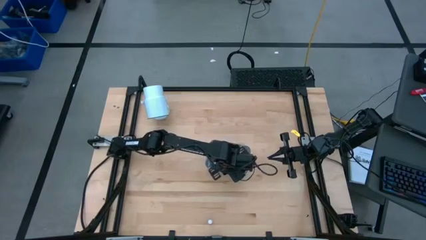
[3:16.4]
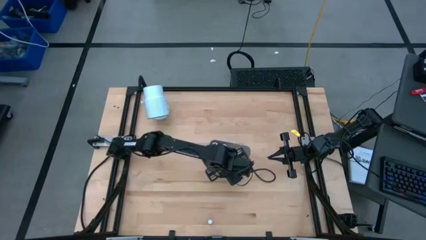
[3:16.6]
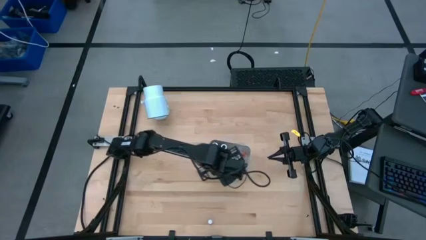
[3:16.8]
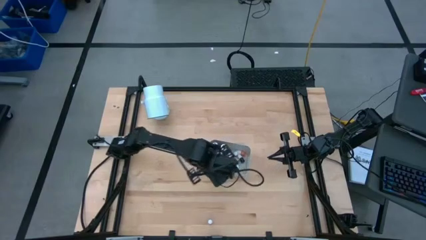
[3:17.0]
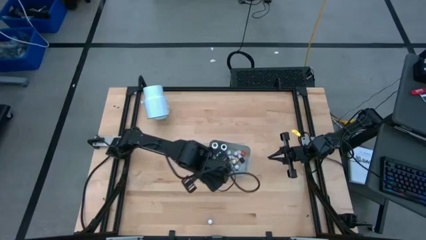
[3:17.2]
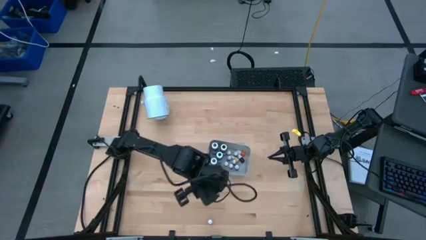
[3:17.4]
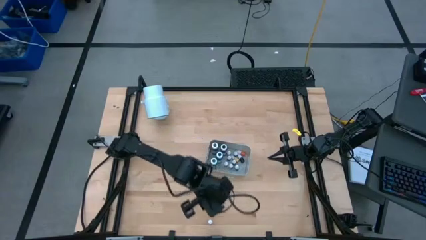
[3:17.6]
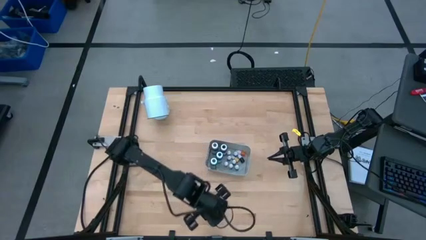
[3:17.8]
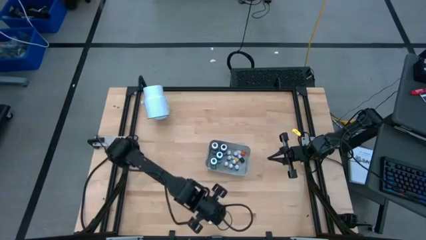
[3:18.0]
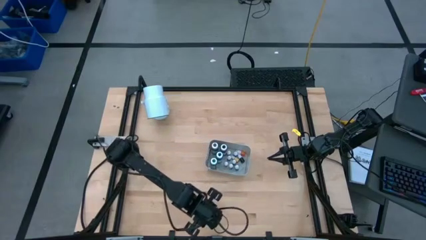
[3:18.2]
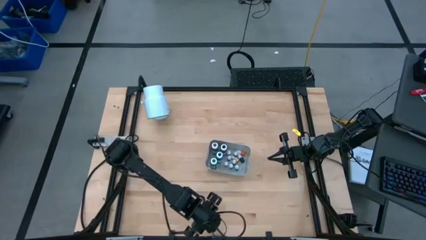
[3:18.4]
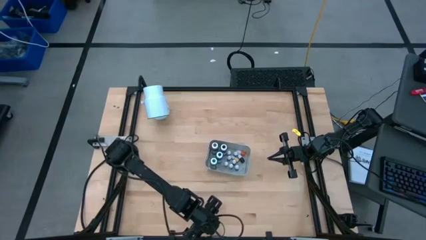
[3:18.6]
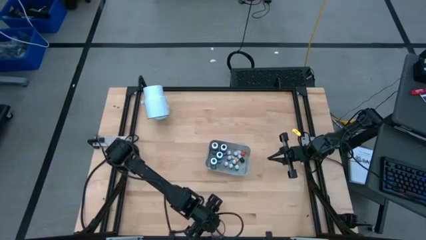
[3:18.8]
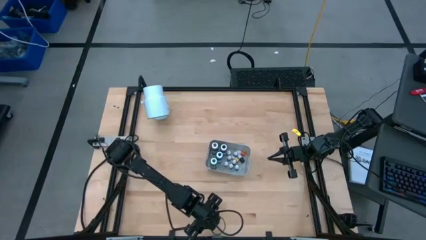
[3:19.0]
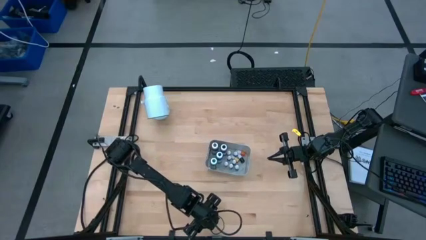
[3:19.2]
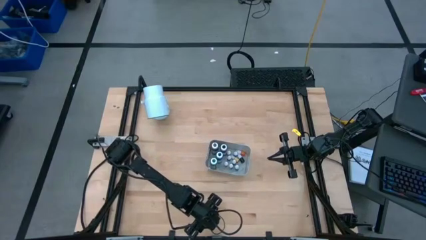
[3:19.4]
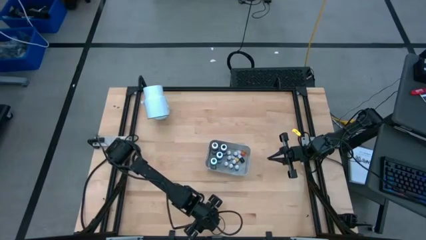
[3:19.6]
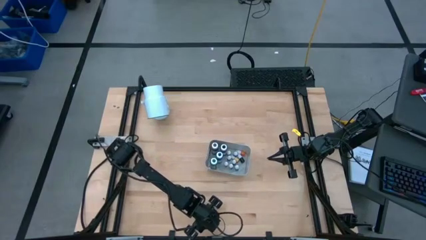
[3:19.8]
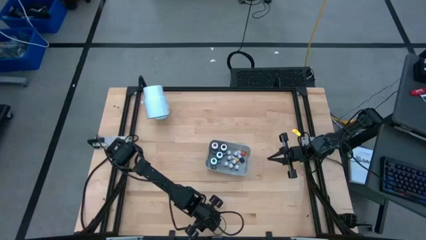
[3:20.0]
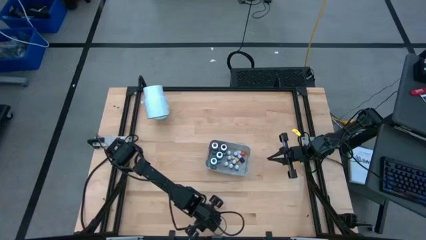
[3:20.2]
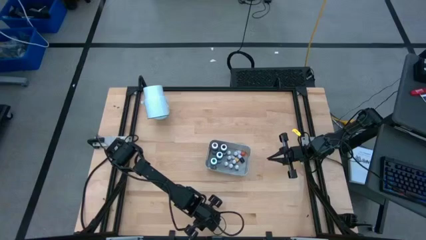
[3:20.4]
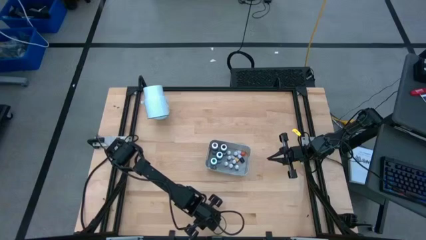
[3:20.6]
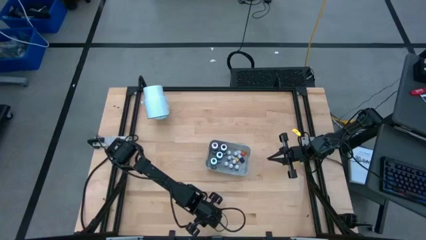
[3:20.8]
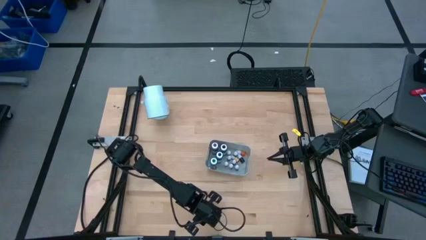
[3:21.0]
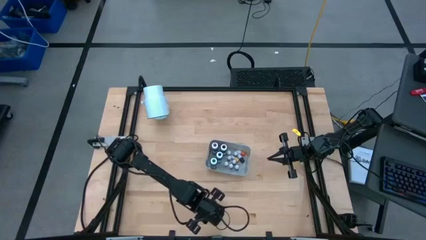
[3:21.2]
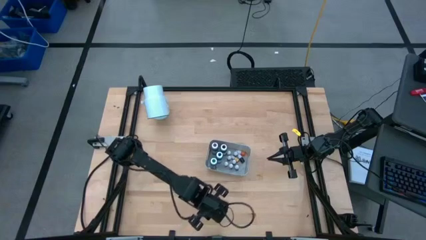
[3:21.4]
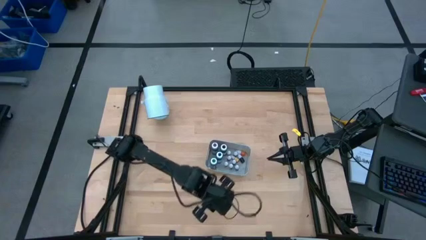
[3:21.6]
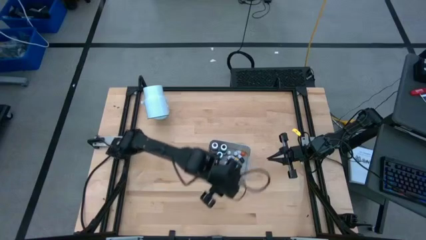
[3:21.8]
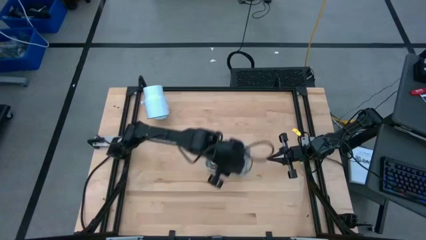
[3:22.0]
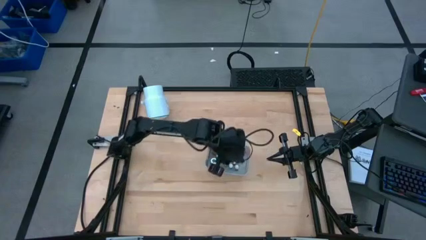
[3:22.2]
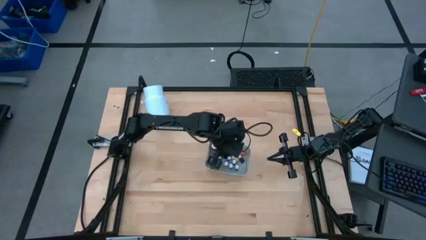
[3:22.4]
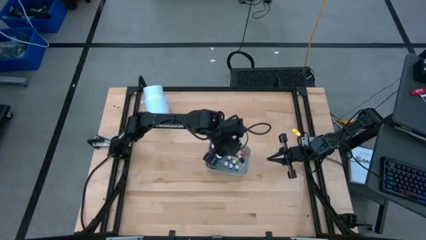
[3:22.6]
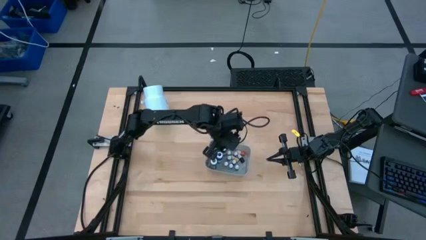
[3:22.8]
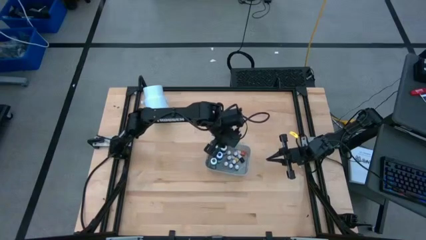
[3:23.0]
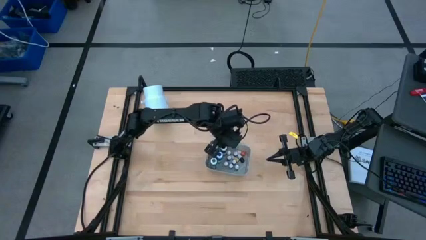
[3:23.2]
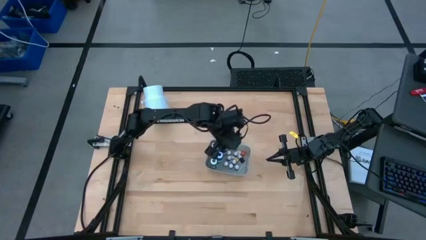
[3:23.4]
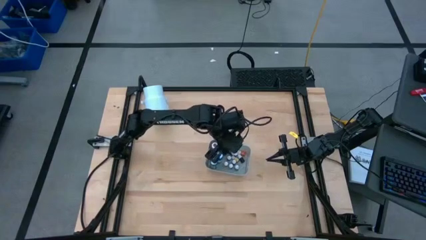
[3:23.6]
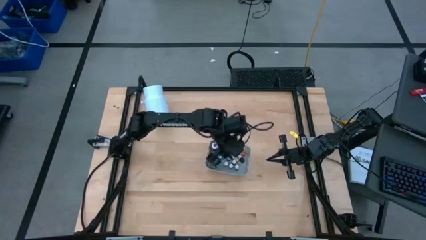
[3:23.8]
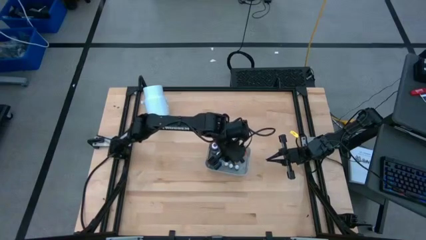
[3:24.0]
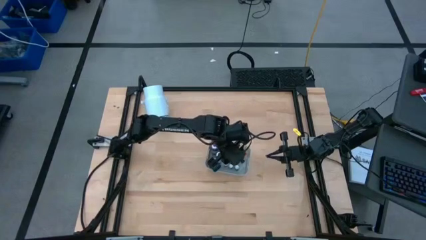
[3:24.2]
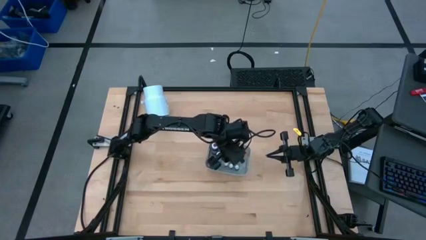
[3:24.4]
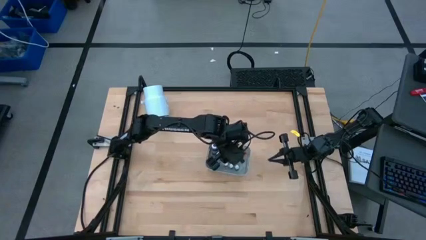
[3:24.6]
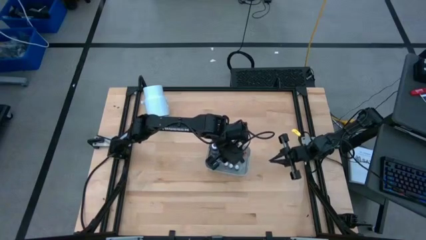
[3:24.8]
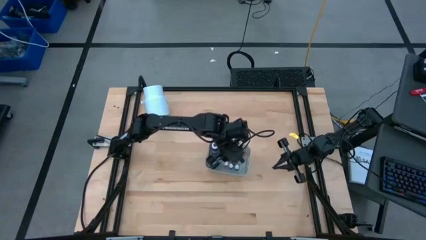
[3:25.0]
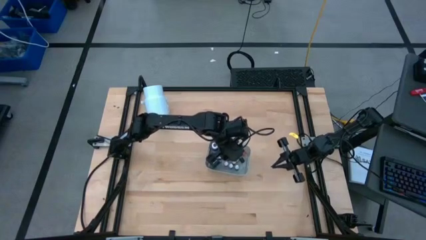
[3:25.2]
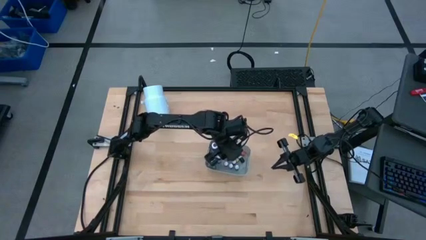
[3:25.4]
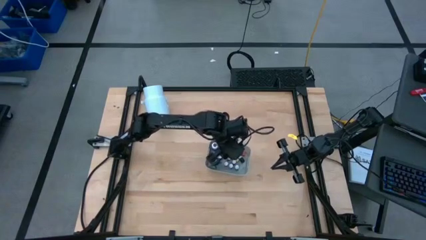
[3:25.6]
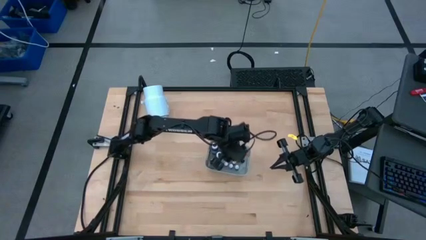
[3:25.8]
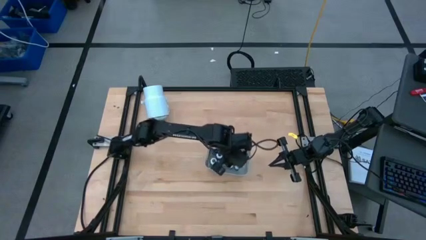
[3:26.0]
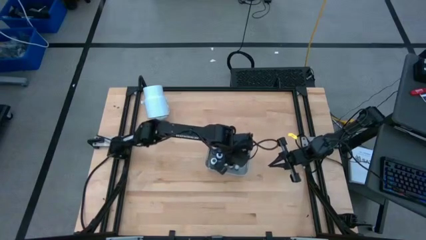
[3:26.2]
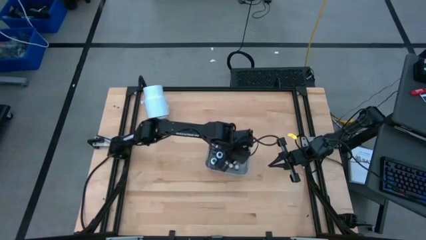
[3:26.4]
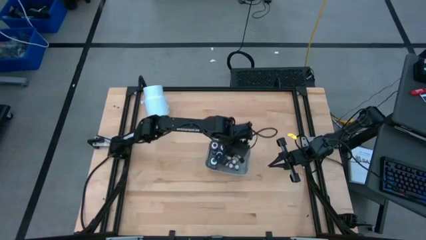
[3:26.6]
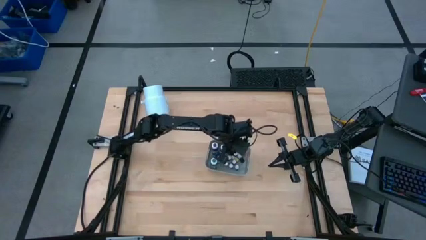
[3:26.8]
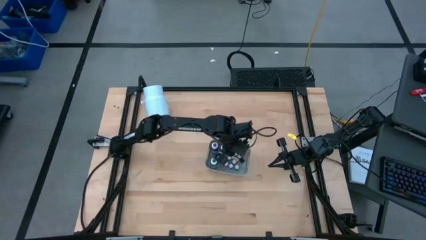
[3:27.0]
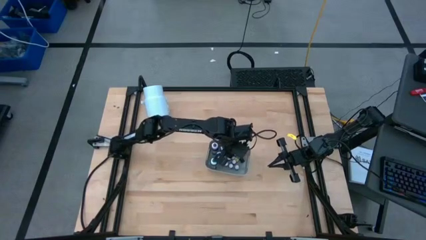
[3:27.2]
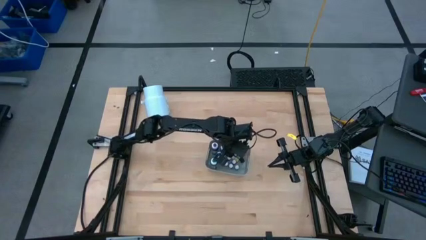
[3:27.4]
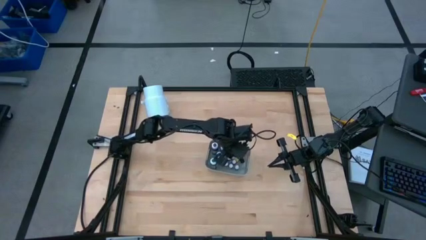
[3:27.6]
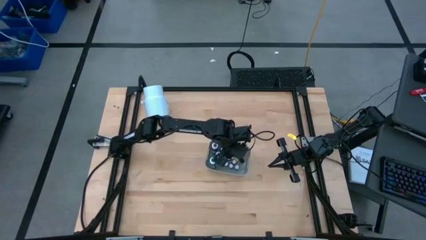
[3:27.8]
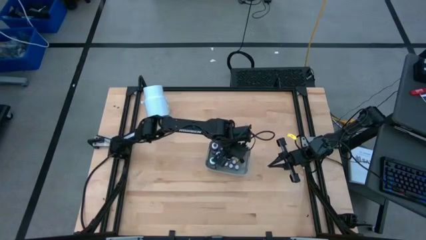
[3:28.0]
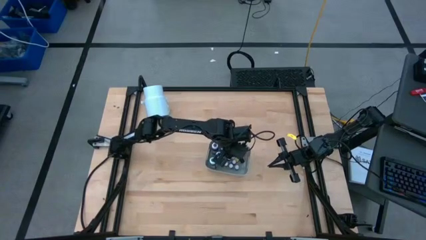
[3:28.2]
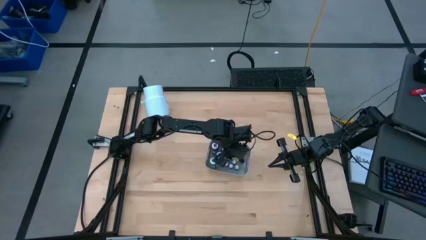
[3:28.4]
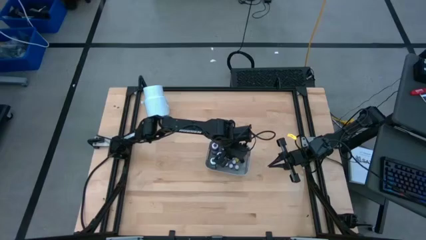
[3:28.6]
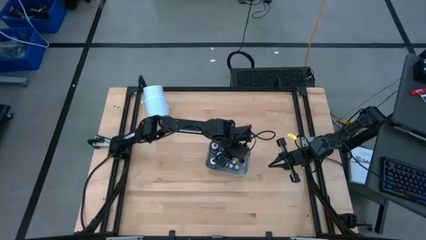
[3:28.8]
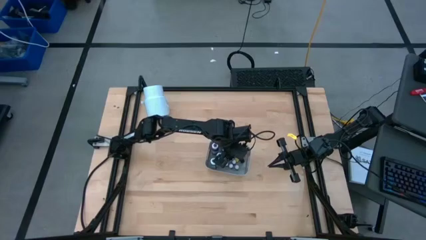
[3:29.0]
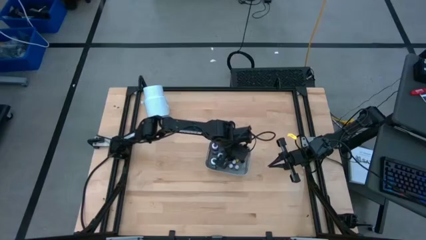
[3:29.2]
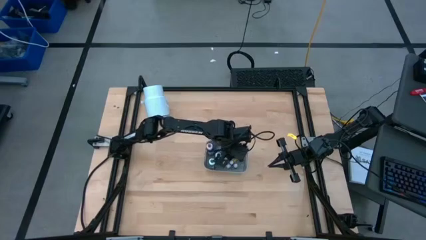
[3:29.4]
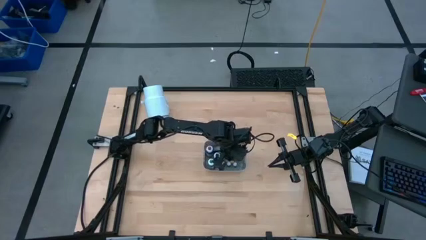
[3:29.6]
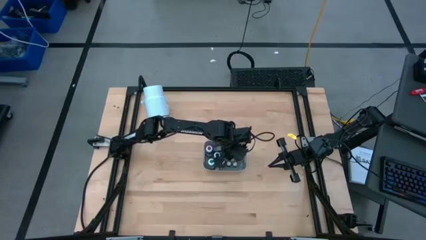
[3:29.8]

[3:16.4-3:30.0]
Task: Pick & Place food coloring
Put the small red food coloring bottle into the bin

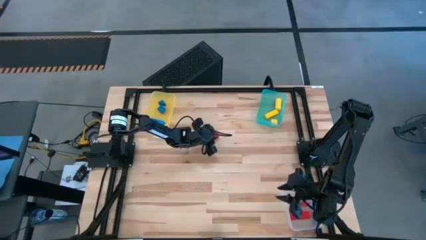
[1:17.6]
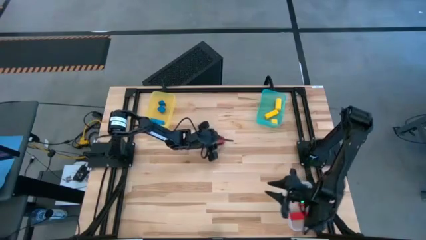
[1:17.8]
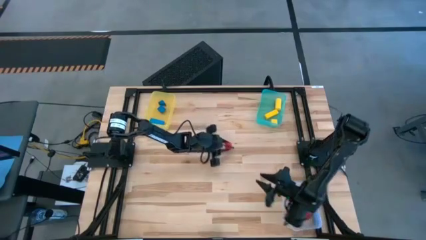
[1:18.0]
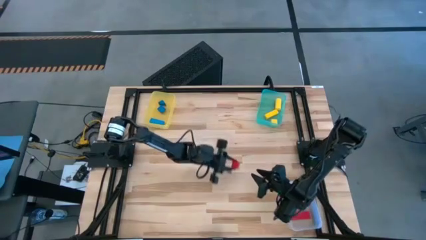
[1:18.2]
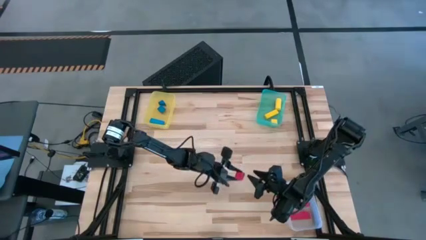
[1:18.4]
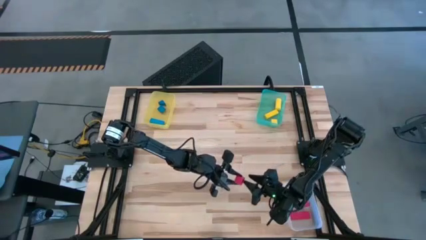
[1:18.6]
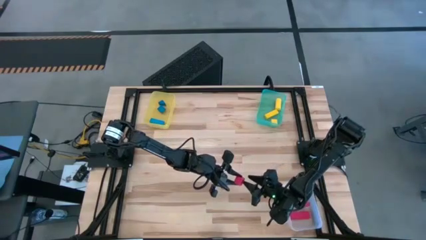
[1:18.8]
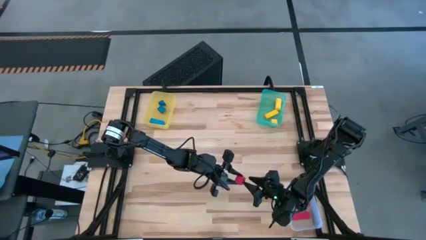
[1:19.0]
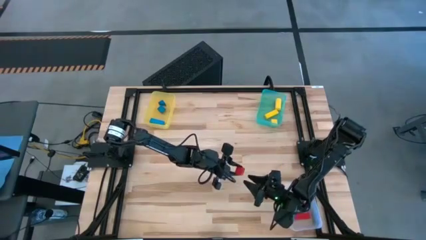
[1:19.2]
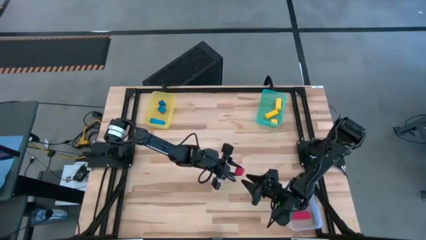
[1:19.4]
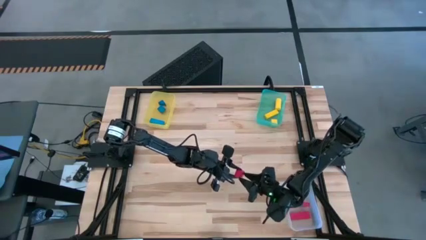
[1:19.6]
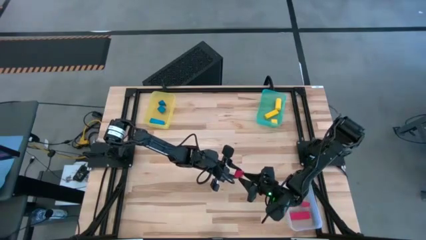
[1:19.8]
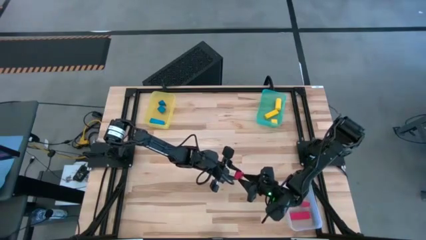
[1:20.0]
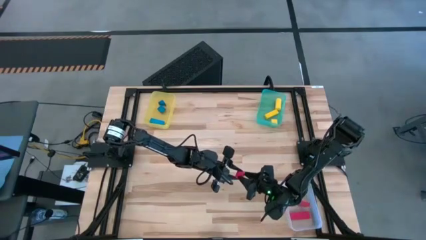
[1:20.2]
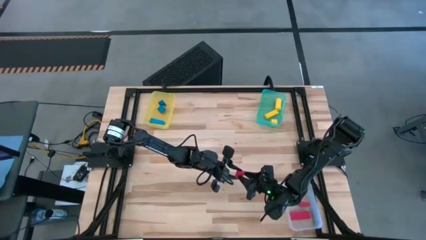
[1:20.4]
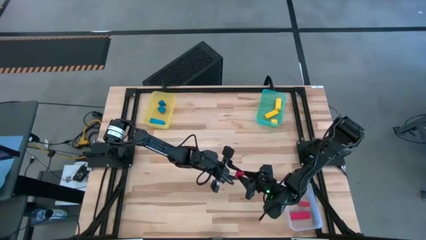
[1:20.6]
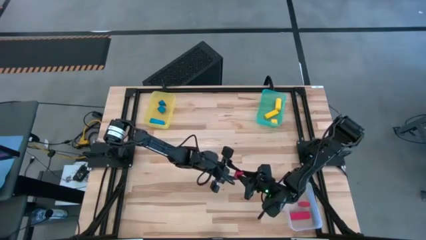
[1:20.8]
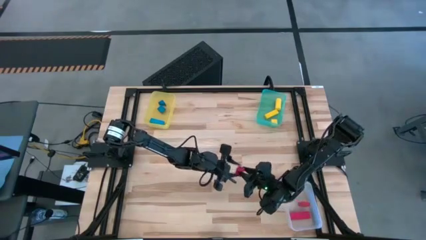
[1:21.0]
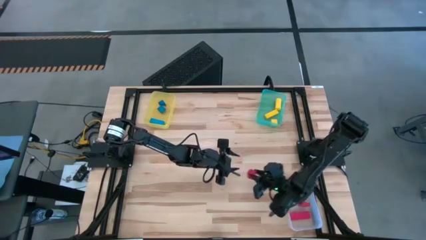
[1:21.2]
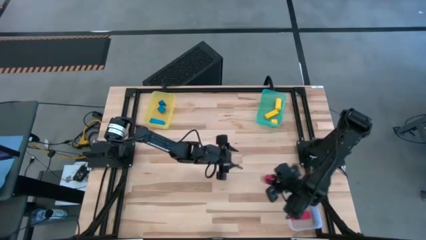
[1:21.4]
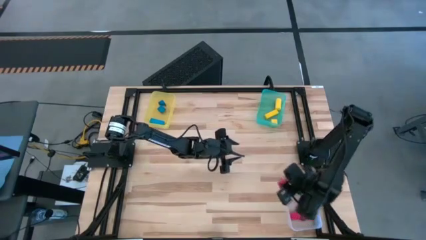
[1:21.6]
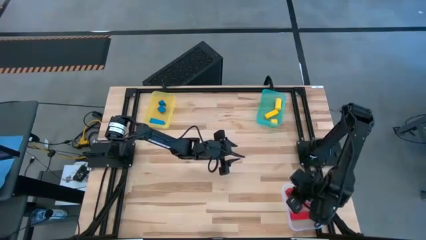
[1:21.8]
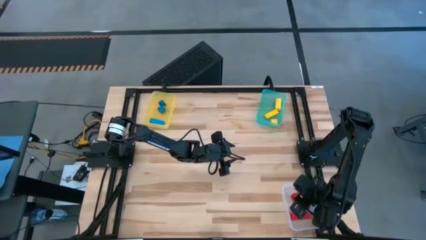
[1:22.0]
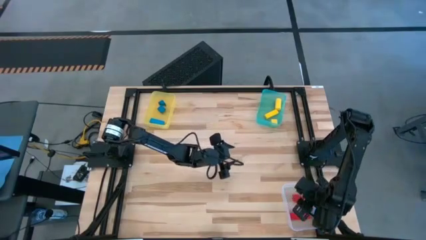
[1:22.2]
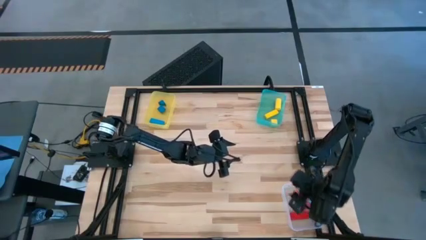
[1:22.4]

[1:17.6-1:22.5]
Task: Sort & place blocks by color
Put the red square game block into the white transparent bin
